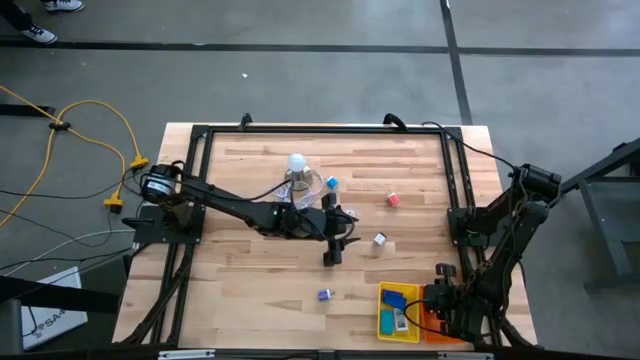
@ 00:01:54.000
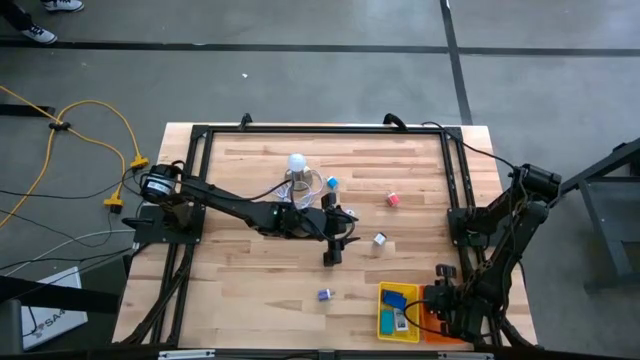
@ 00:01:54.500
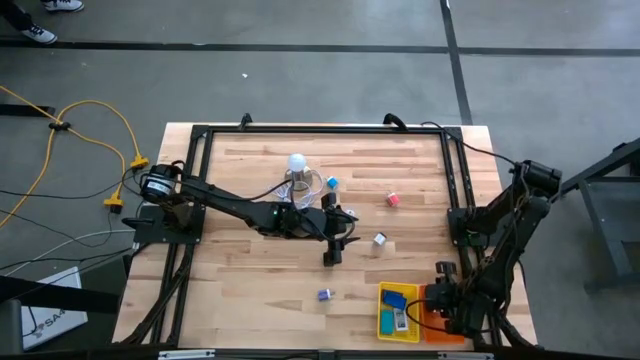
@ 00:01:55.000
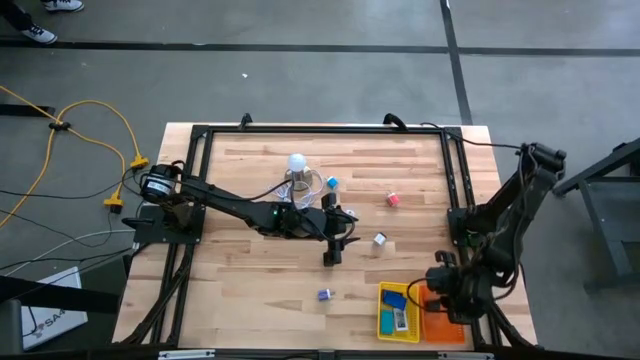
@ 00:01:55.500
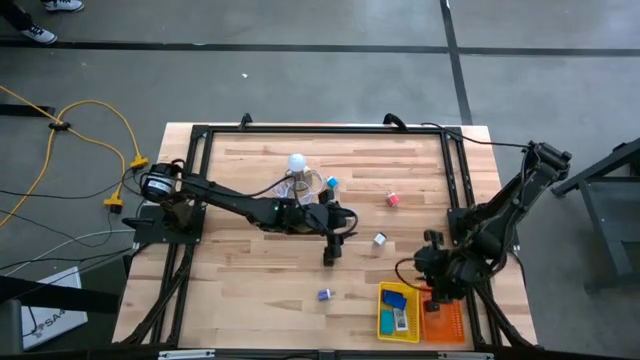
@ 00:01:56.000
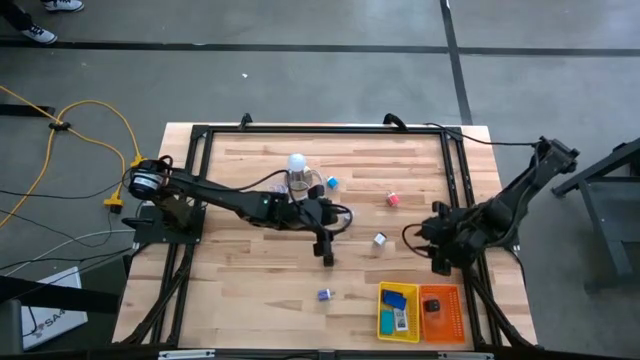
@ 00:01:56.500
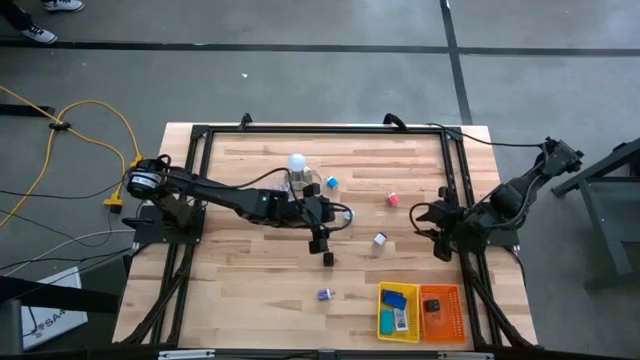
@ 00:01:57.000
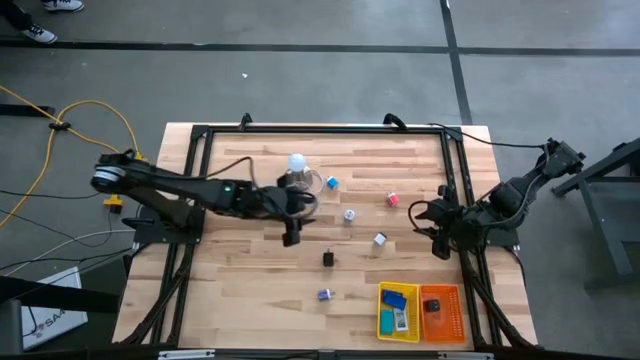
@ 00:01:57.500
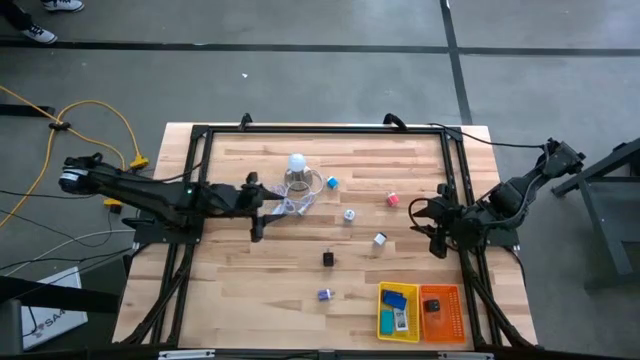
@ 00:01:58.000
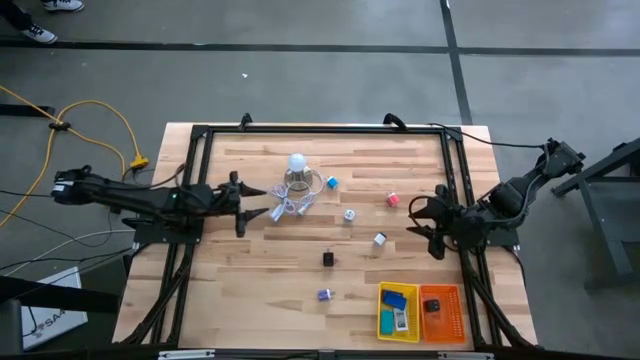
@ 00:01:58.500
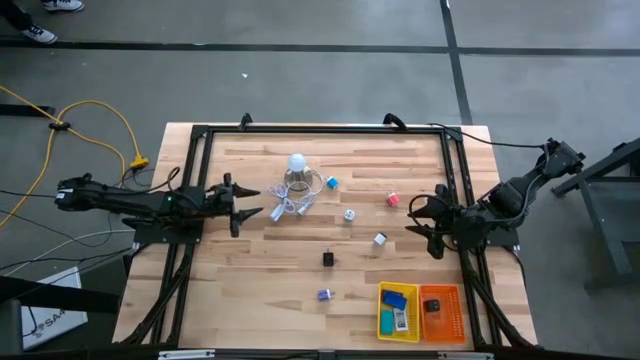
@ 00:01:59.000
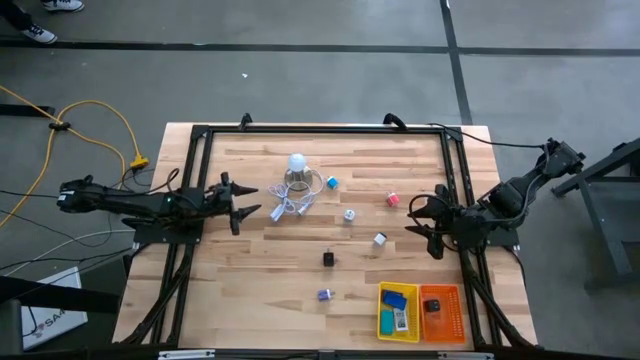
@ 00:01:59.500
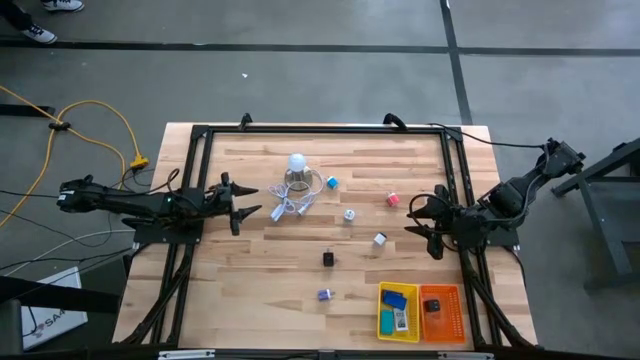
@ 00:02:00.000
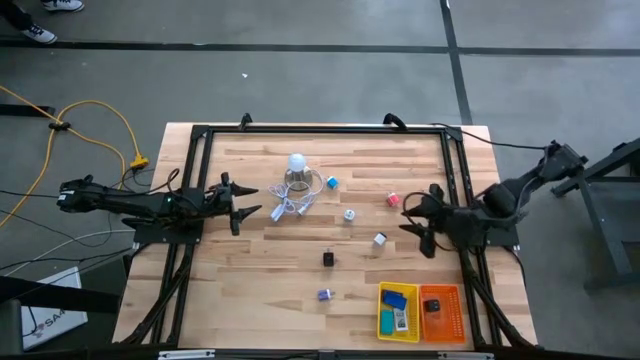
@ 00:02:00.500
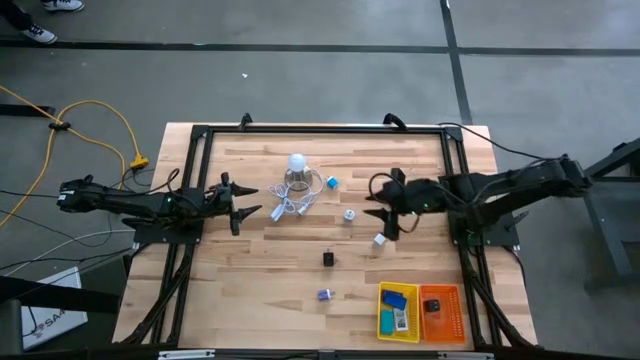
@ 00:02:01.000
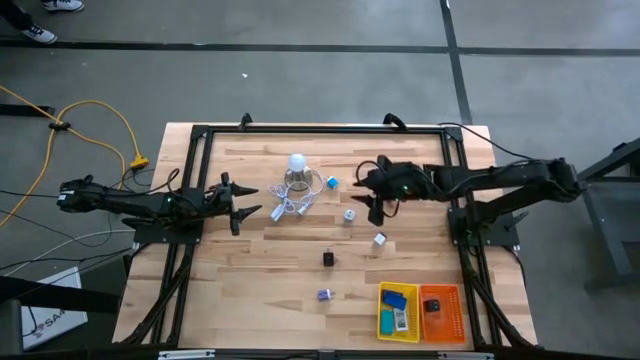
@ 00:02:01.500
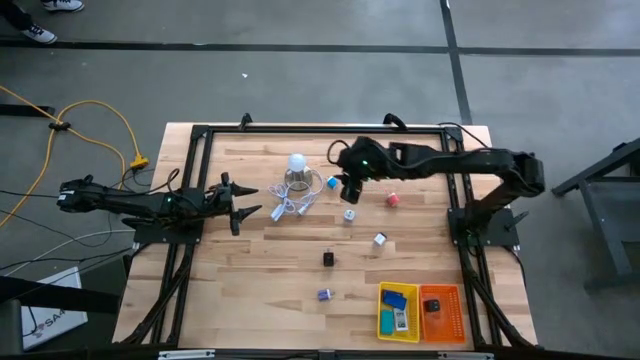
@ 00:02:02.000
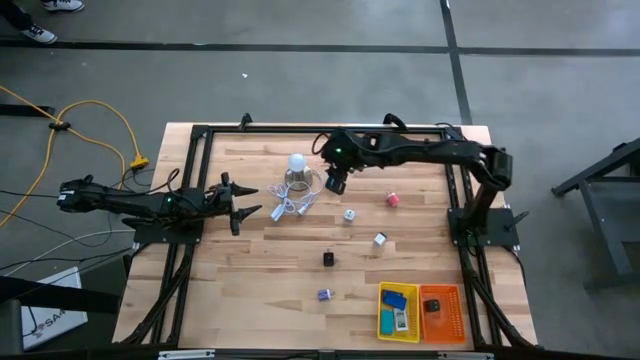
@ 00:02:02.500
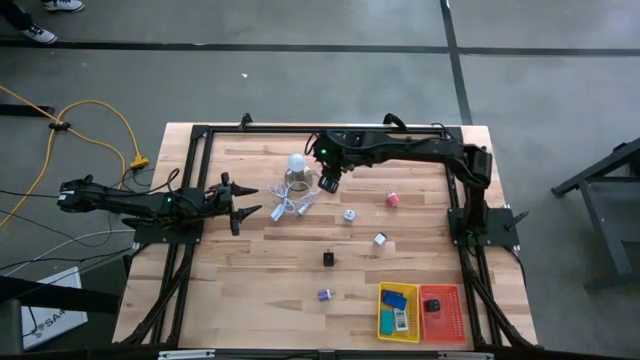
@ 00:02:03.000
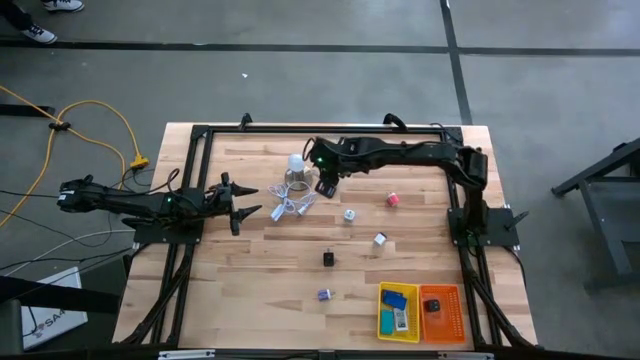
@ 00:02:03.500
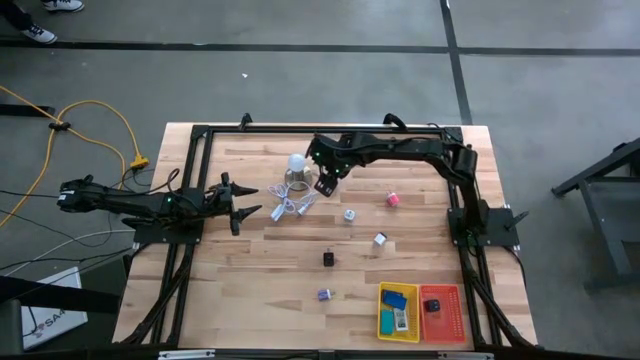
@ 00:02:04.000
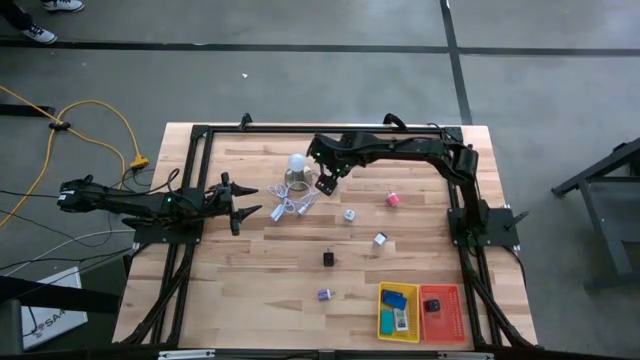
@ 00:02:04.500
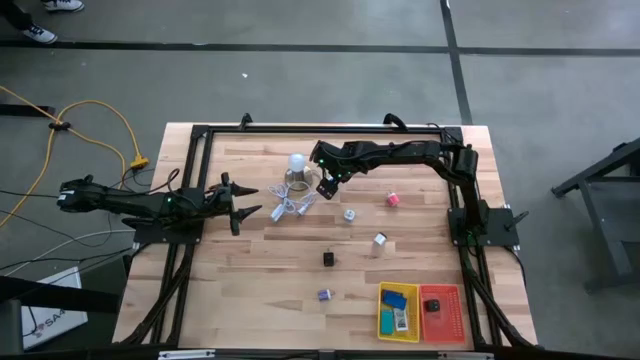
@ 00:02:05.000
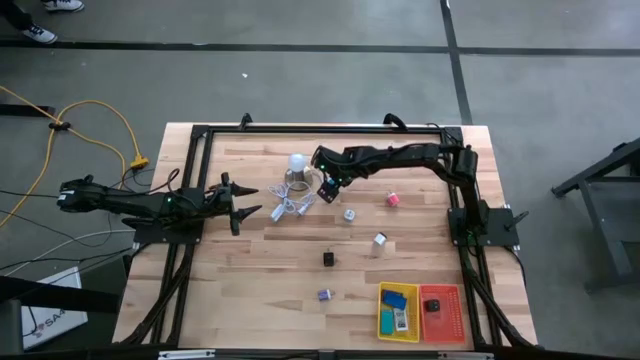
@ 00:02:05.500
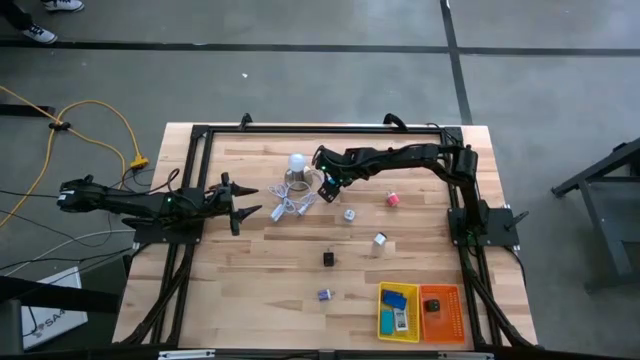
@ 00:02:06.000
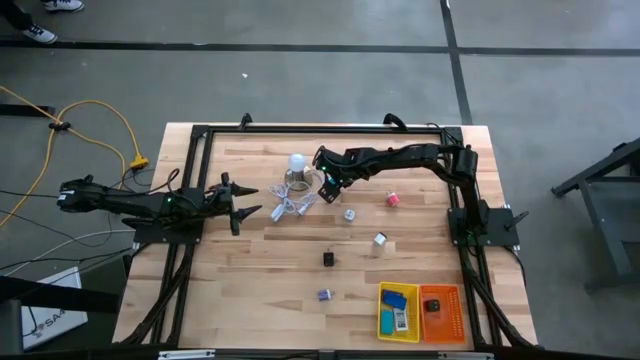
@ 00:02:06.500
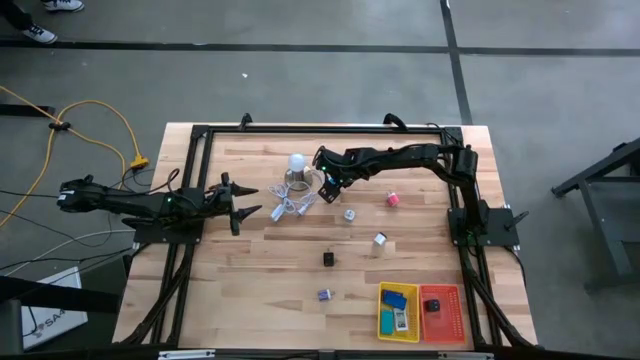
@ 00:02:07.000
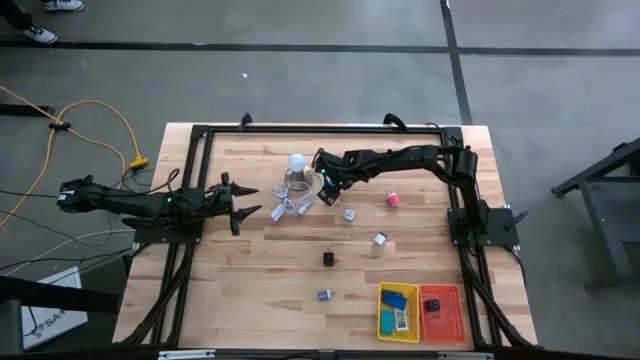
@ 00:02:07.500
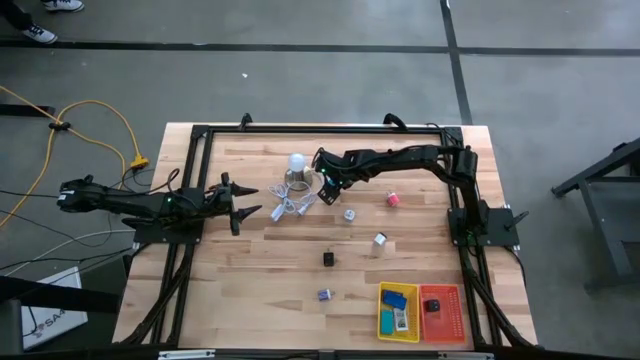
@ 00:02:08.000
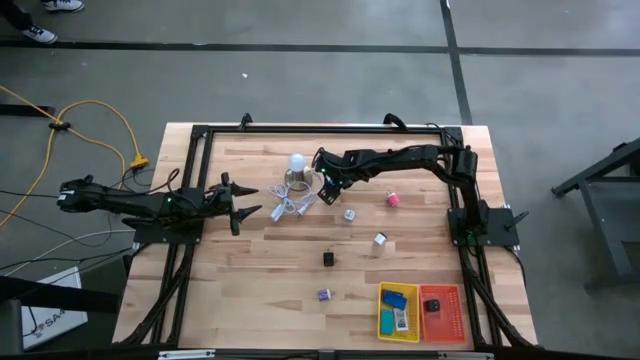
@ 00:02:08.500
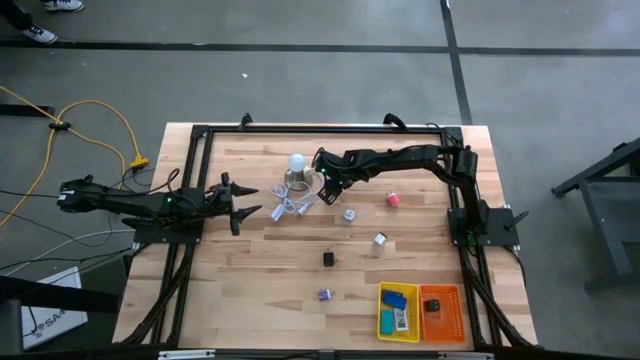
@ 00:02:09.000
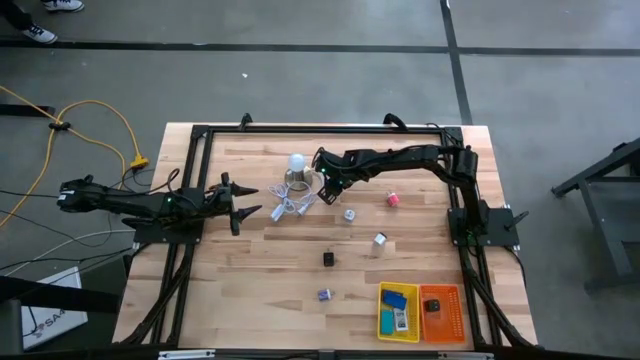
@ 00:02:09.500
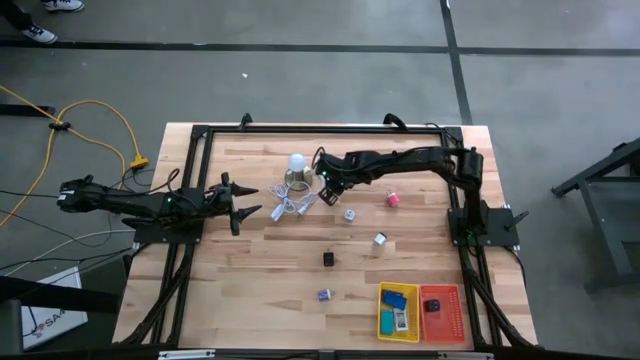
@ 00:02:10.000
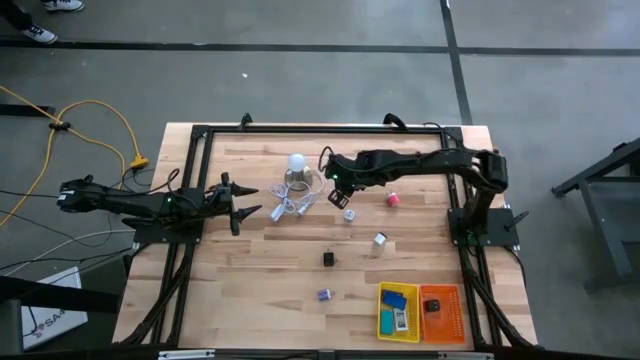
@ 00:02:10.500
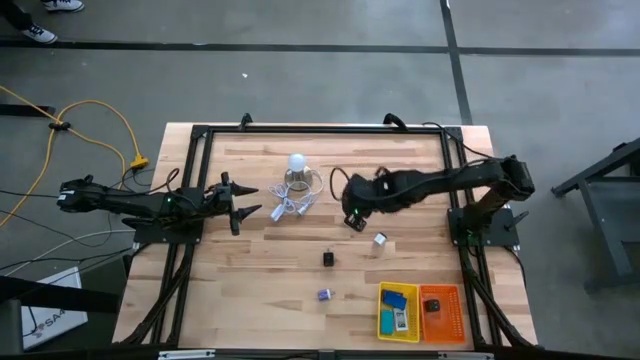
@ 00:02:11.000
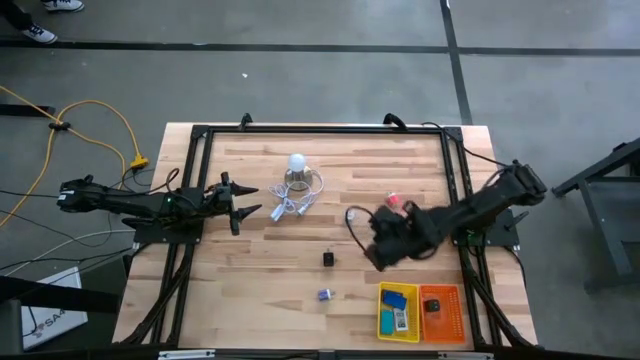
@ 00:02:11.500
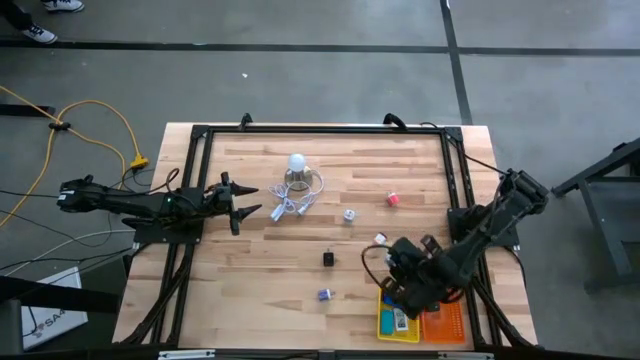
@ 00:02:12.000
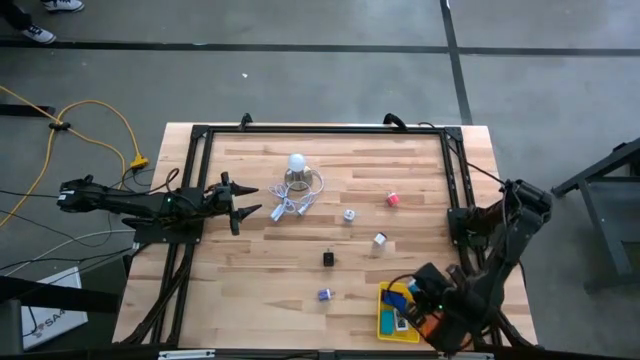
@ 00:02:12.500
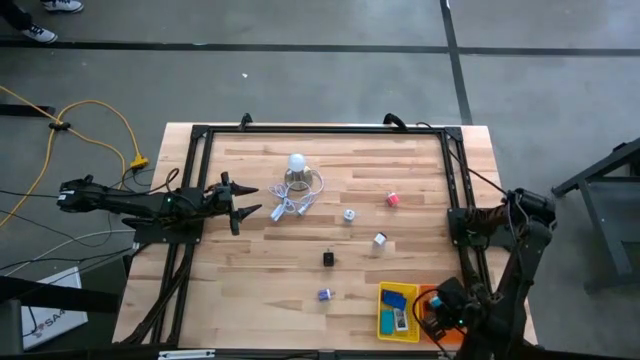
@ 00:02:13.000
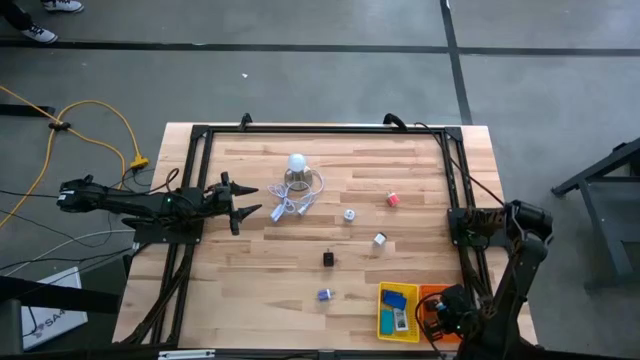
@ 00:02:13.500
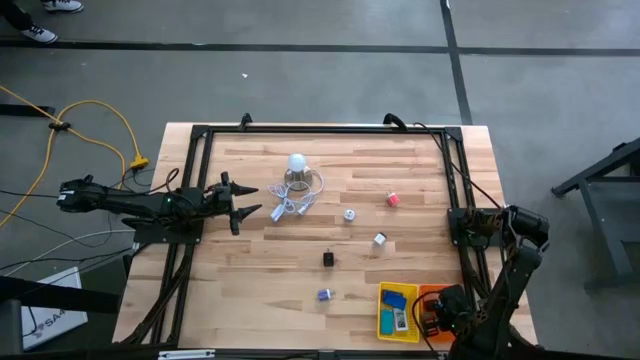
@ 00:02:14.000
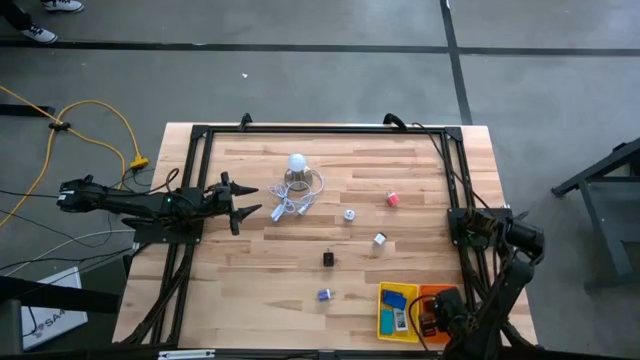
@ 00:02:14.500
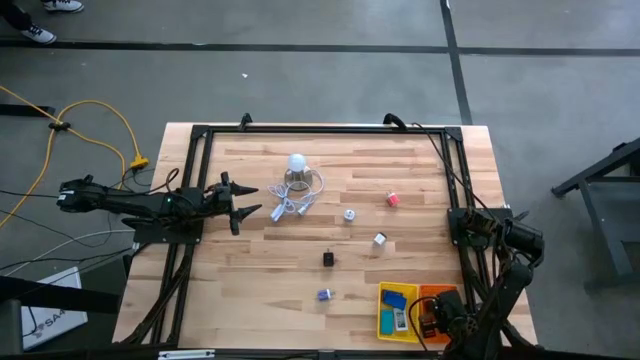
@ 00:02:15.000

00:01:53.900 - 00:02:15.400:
Task: Pick & Place Office items
Put the top blue charger adapter into the orange basket
